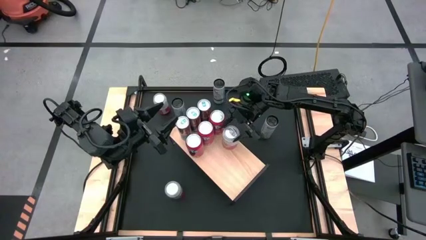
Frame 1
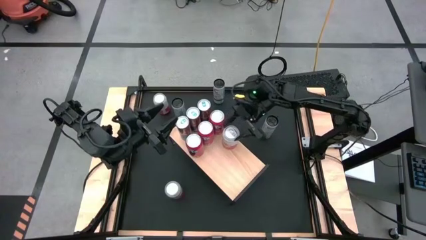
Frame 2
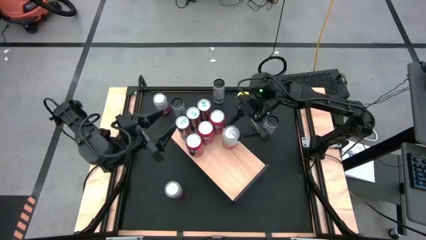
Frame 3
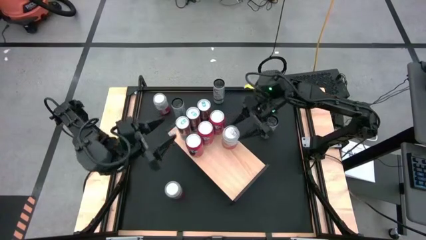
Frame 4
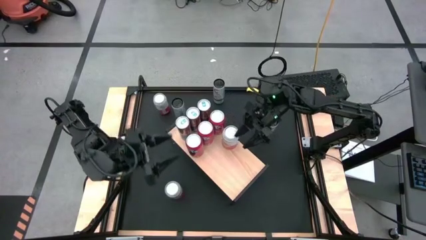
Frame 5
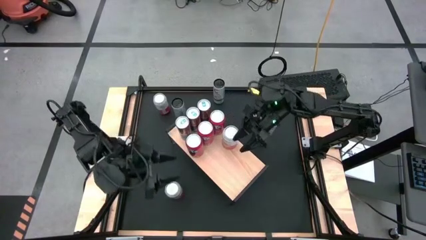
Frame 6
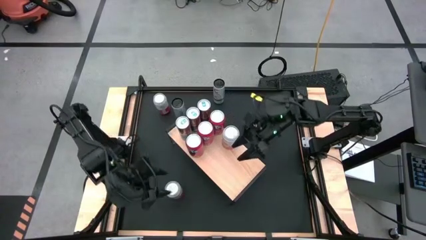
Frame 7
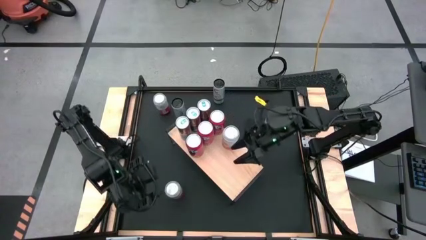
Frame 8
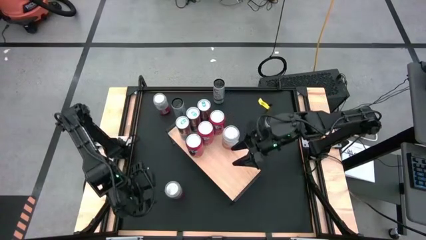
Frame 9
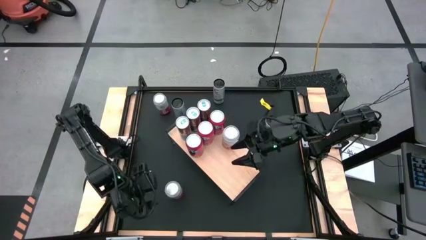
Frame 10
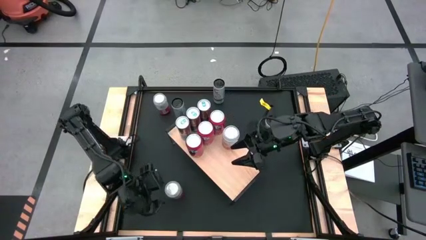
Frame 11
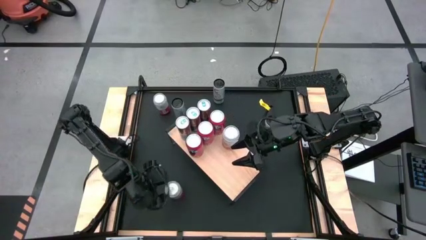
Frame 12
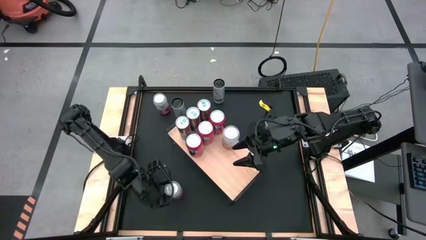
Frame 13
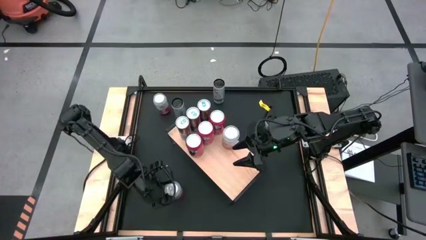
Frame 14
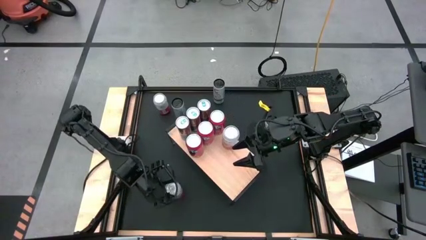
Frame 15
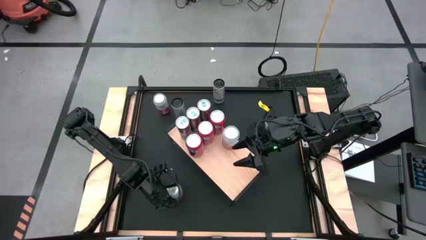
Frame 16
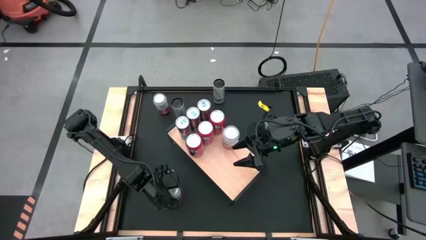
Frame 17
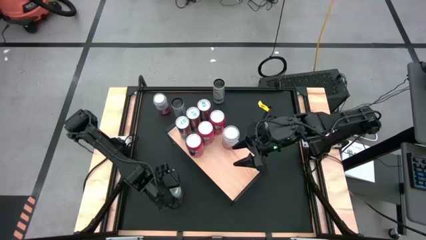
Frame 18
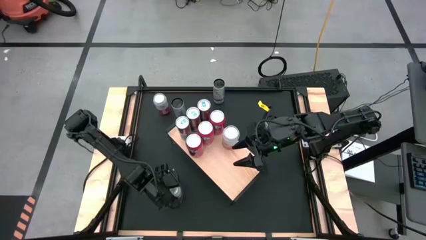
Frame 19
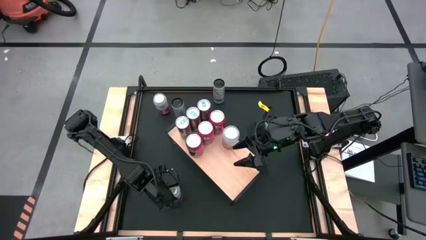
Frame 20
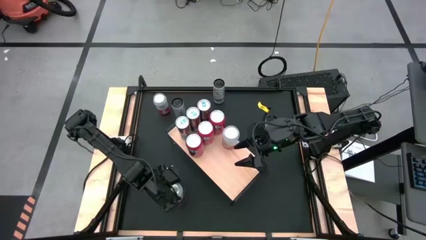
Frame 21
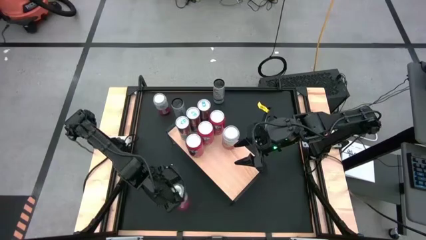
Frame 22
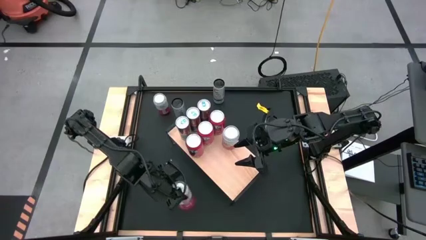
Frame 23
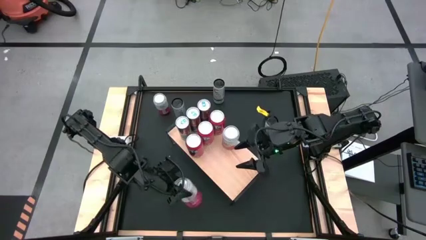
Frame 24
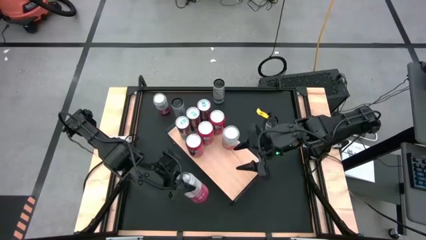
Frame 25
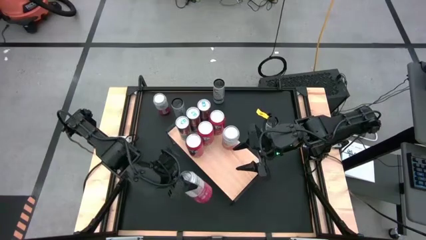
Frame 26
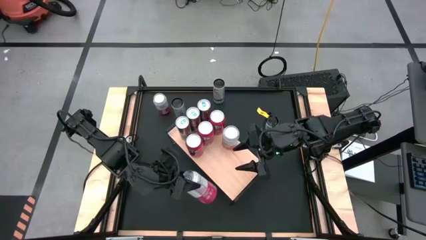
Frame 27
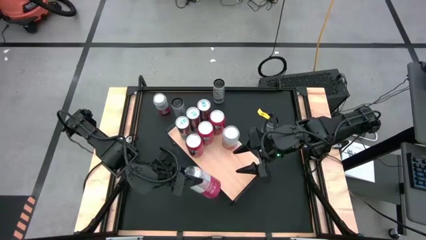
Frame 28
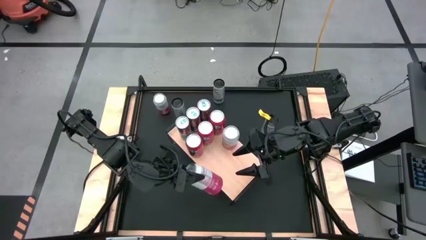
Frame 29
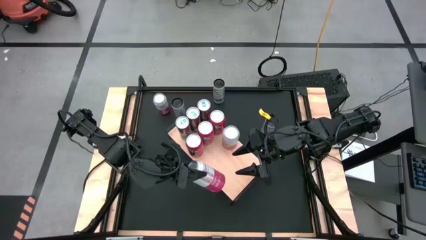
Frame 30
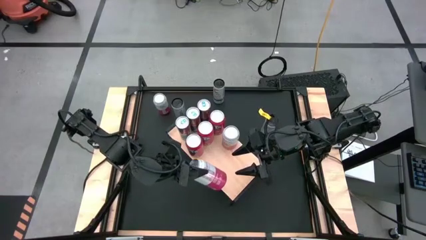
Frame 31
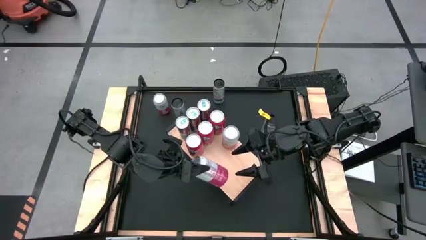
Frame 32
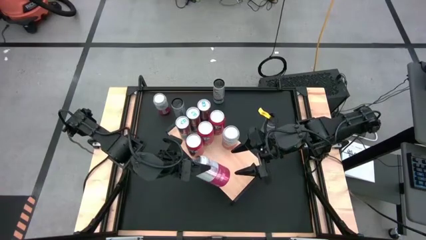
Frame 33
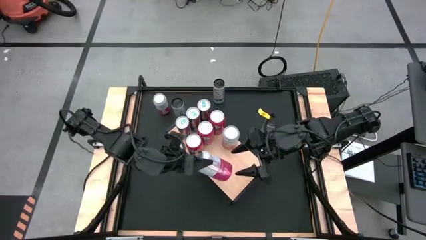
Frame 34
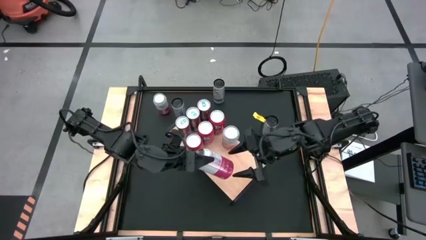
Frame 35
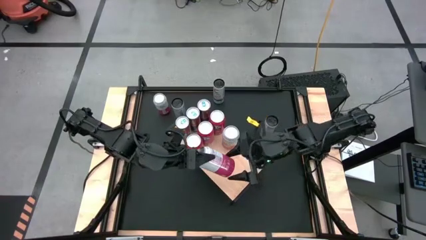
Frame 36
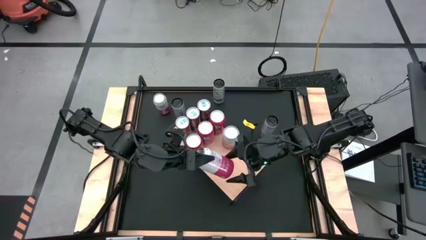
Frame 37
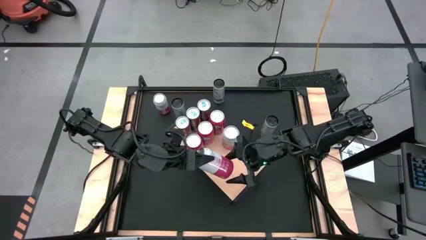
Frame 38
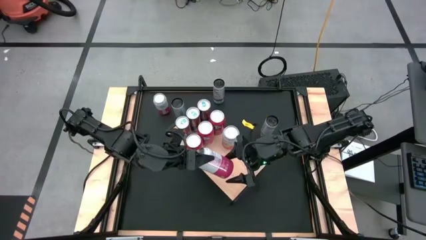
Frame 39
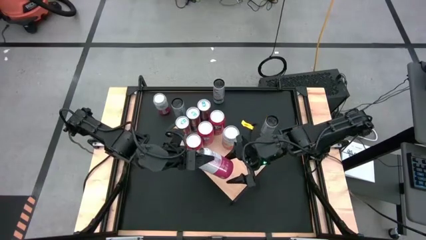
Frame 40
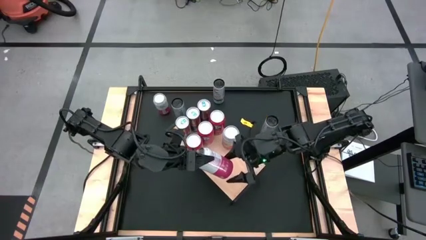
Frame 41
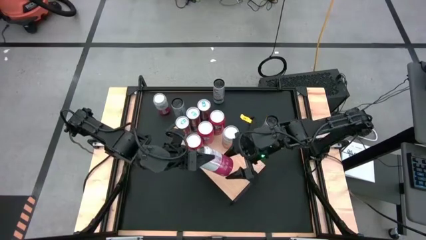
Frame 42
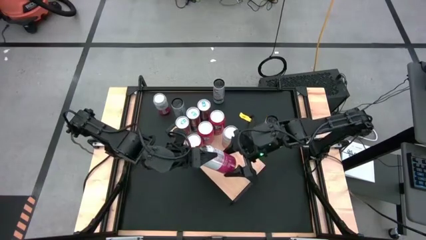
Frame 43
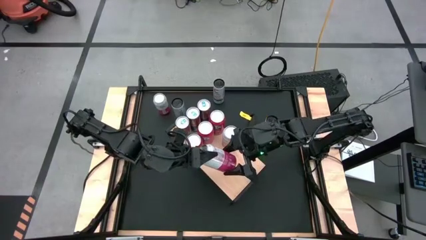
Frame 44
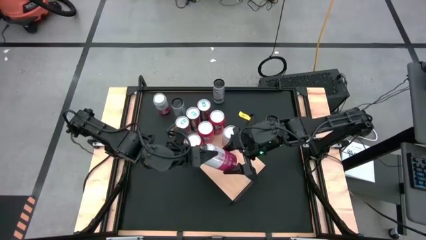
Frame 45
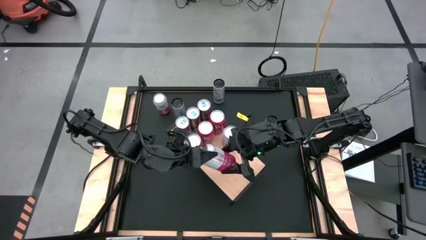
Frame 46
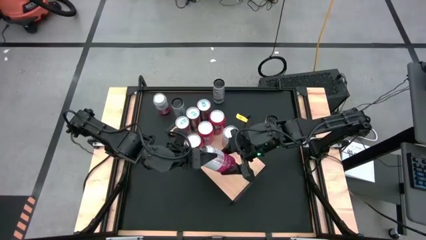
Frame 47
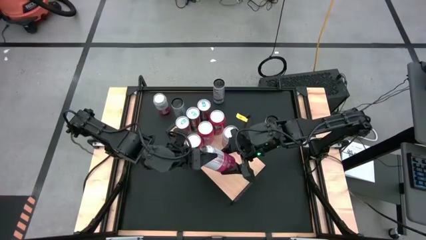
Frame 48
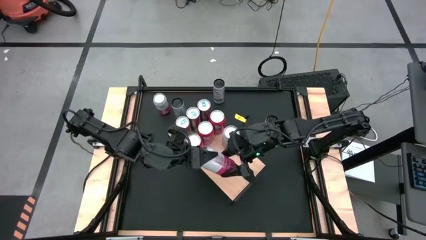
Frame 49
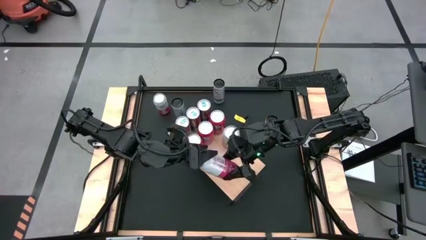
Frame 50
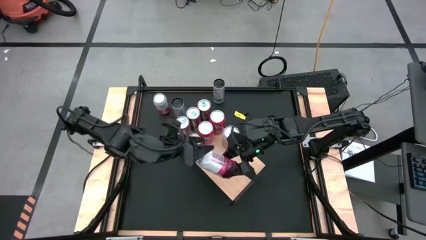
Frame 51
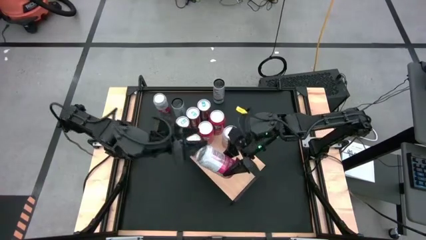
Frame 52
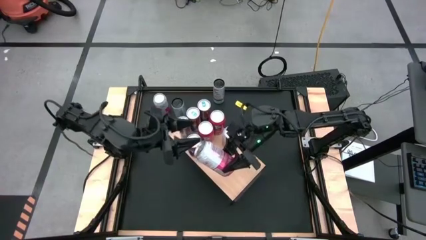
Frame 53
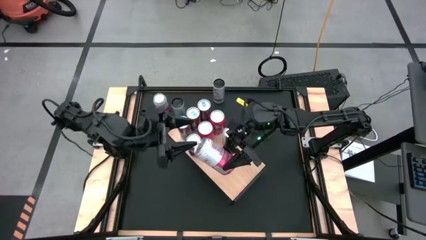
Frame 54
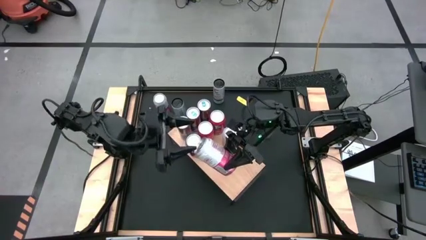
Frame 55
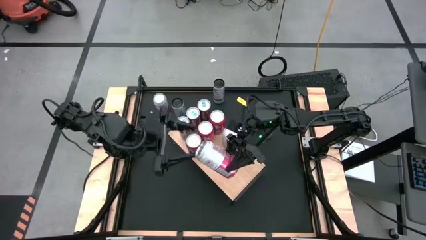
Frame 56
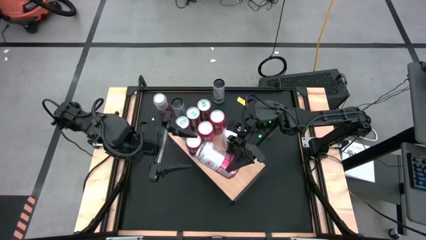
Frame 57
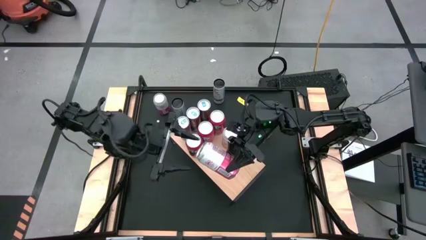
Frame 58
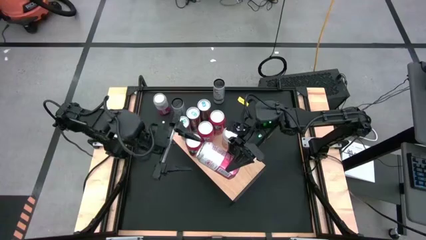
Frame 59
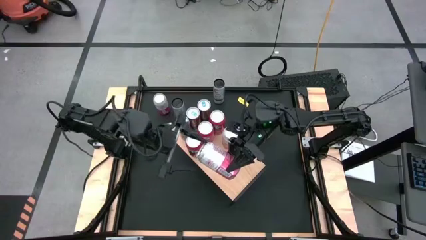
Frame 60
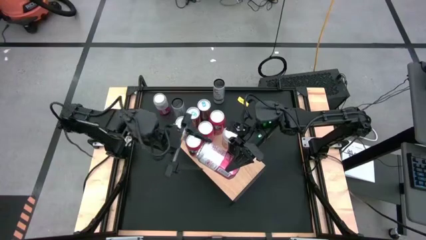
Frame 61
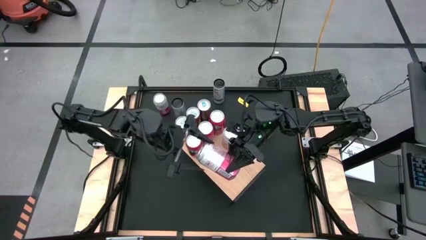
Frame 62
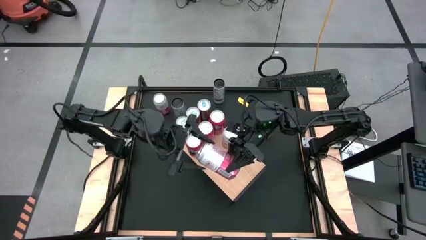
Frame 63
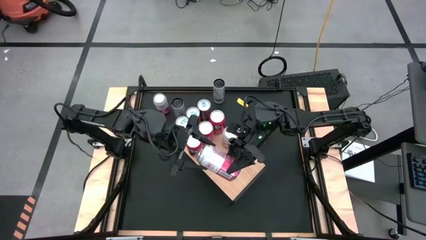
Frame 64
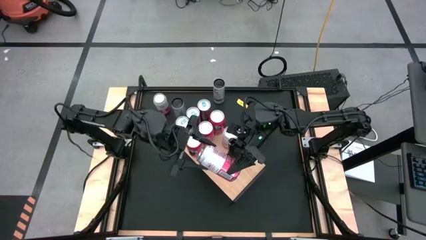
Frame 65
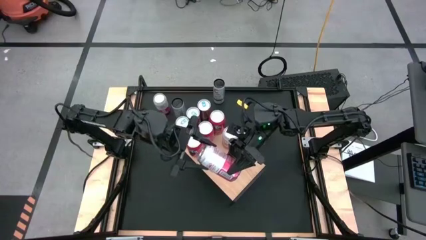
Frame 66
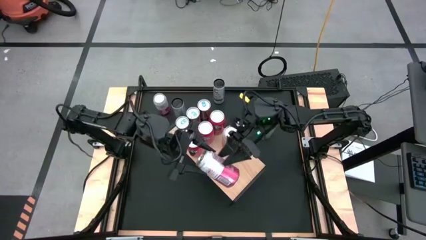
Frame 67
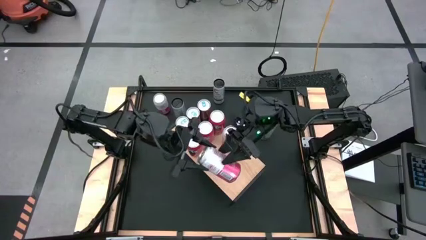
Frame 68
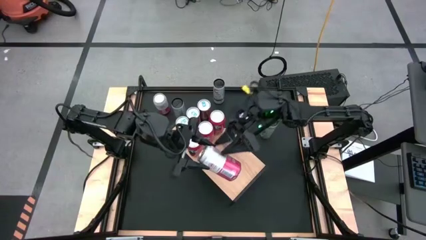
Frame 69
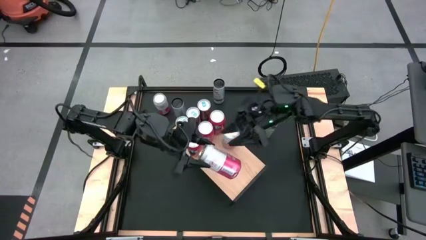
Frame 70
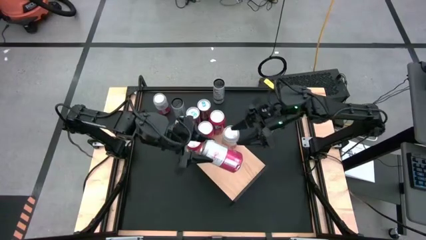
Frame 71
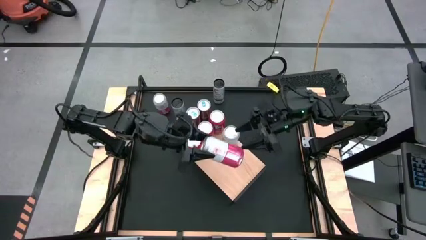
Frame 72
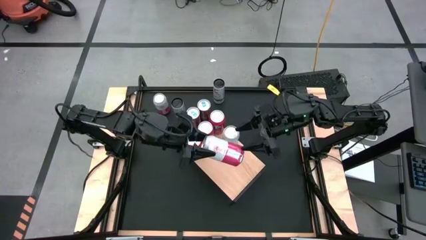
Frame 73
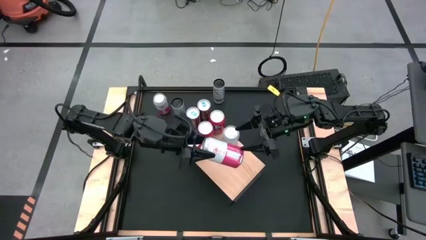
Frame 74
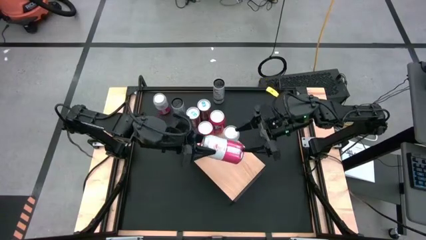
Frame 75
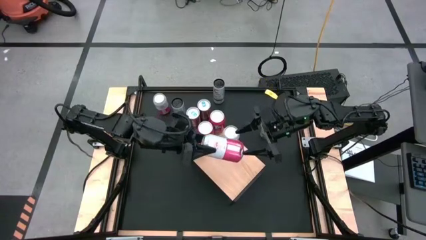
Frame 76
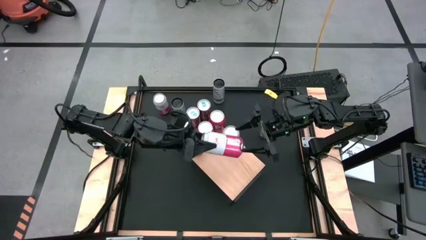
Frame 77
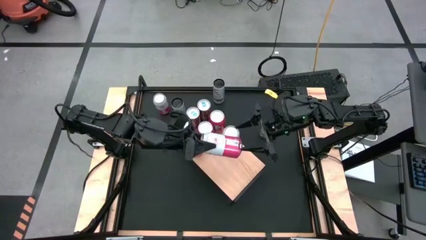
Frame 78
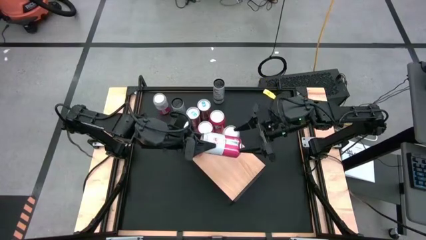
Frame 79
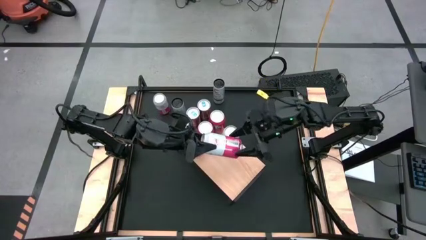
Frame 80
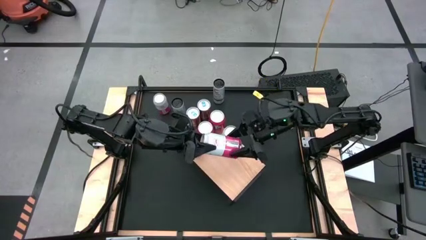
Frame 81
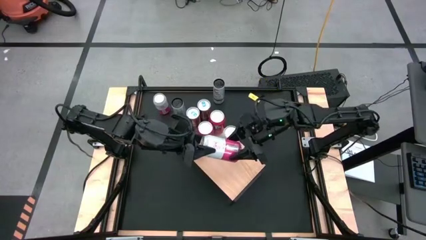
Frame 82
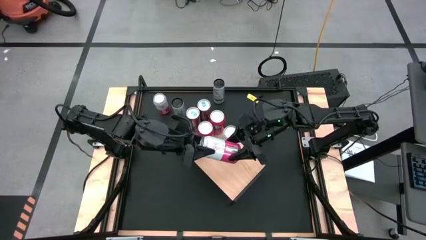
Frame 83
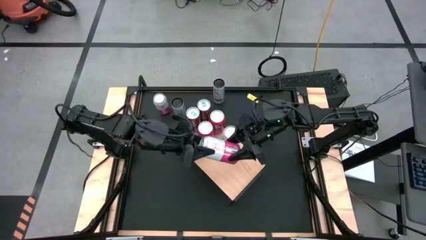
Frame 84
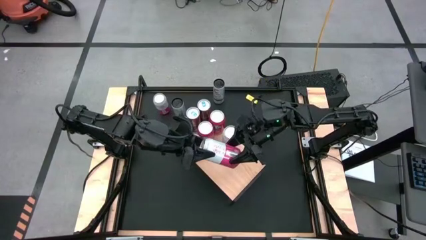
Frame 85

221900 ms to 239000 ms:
Task: Place canned beverage on shelf
Put the bottom pink soda can on the shelf aligned with the other pink soda can
